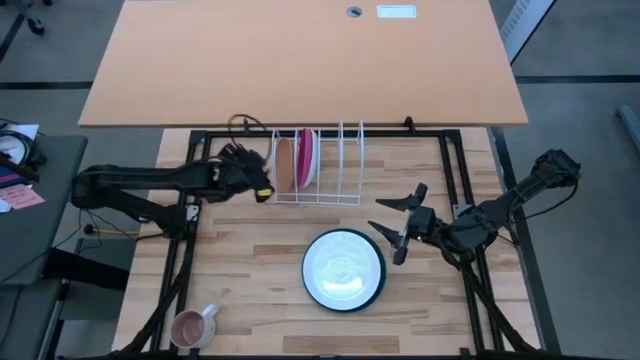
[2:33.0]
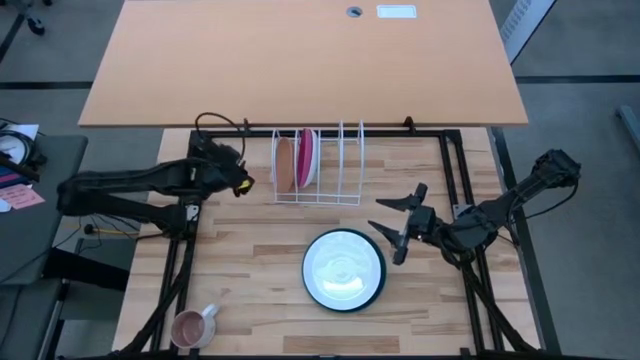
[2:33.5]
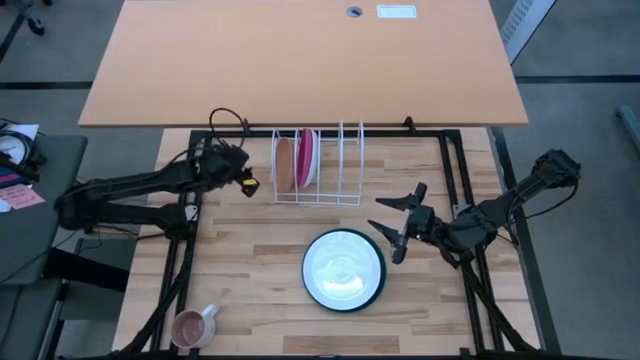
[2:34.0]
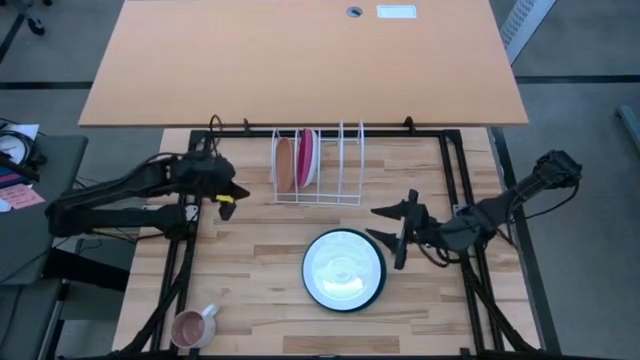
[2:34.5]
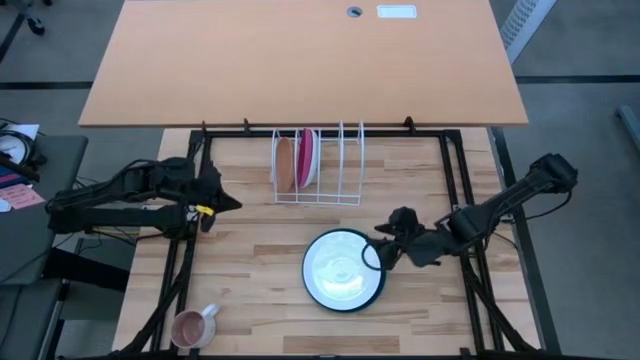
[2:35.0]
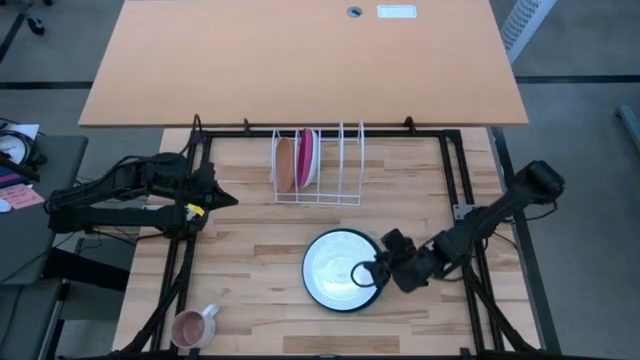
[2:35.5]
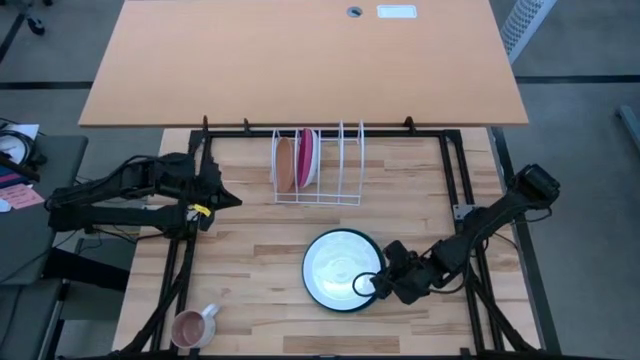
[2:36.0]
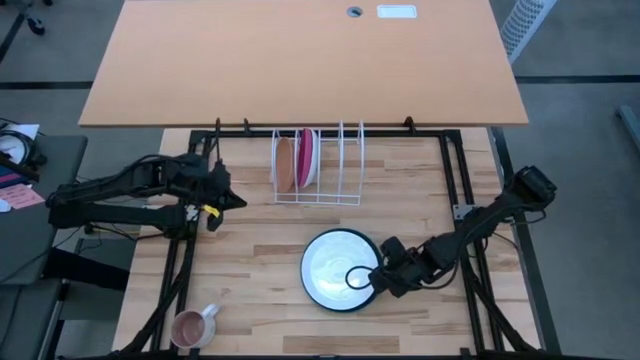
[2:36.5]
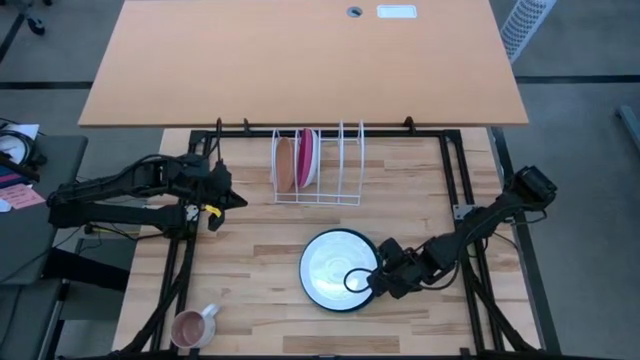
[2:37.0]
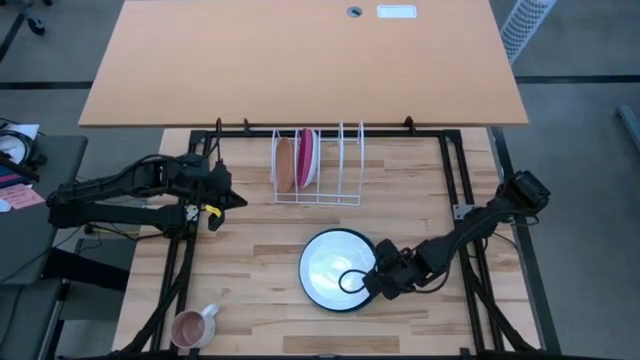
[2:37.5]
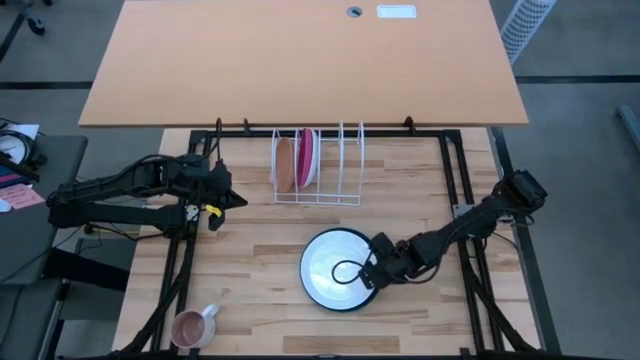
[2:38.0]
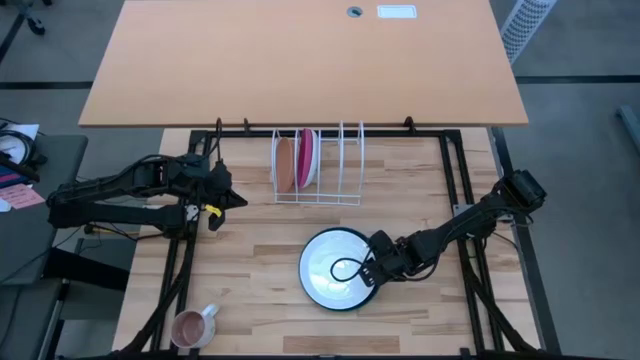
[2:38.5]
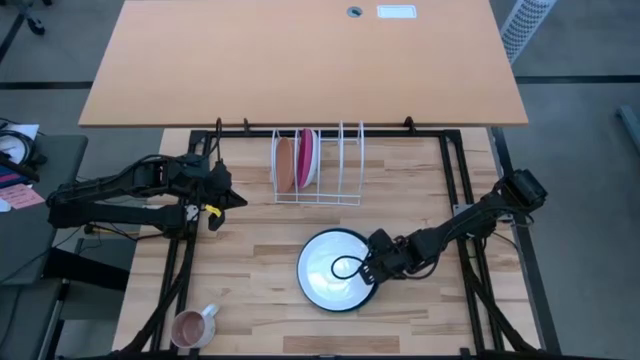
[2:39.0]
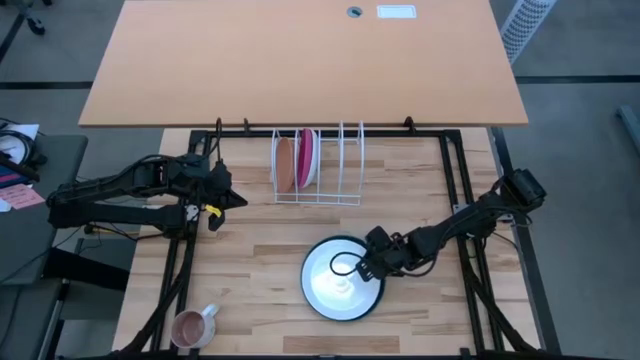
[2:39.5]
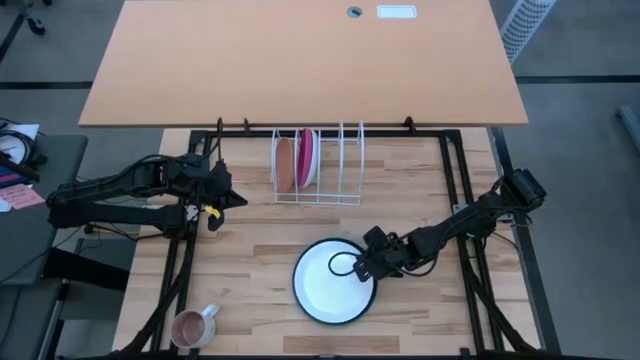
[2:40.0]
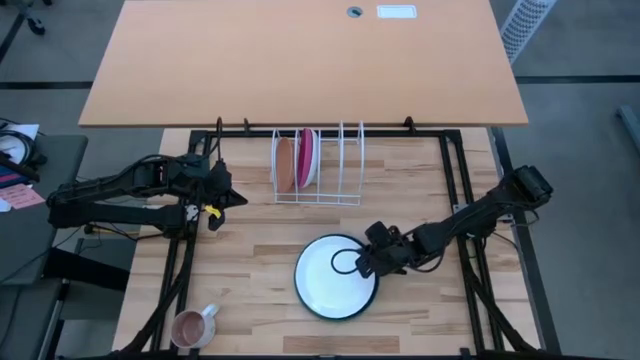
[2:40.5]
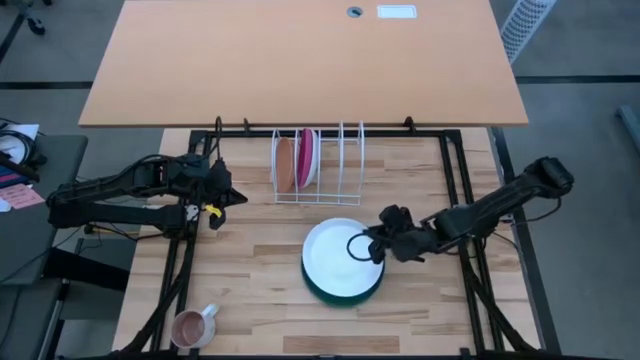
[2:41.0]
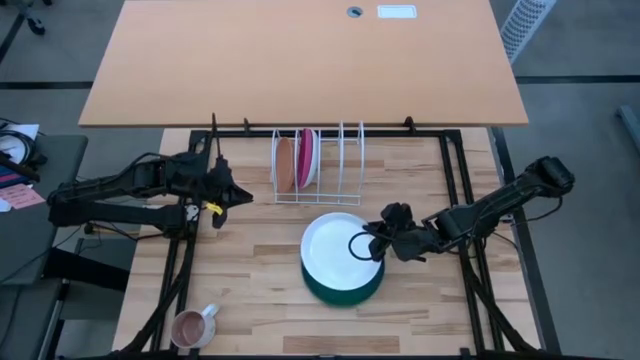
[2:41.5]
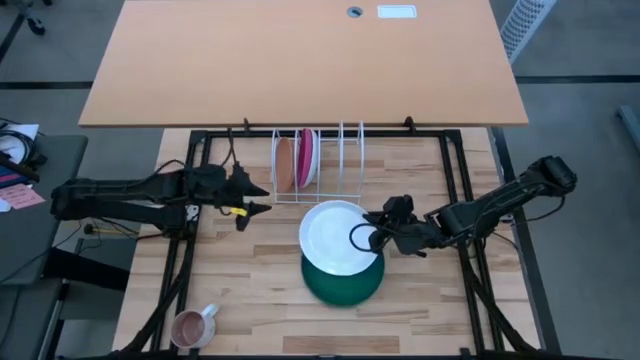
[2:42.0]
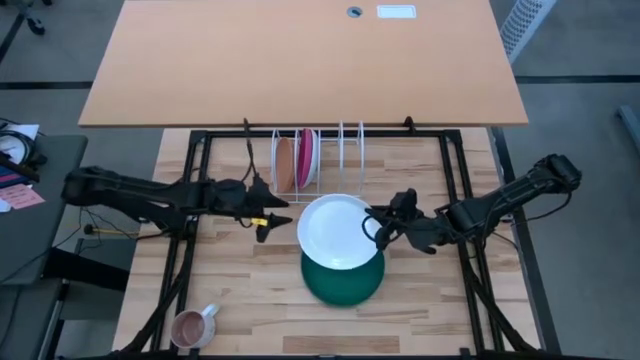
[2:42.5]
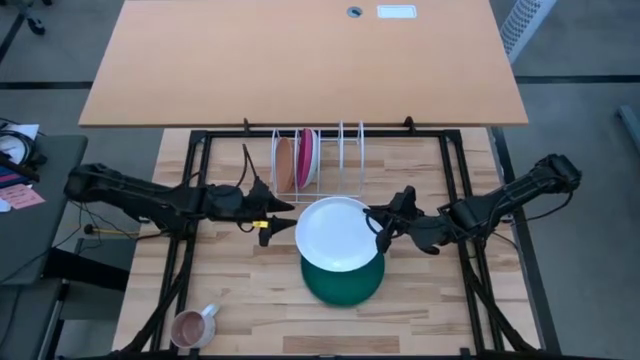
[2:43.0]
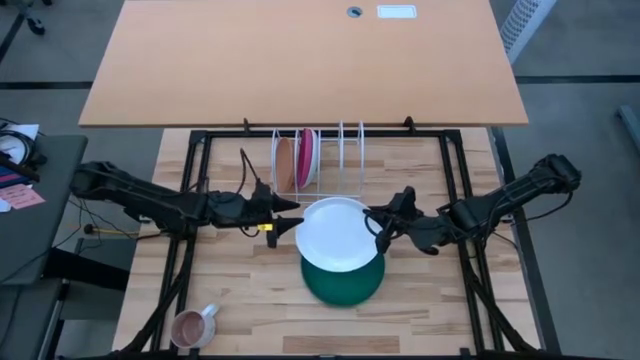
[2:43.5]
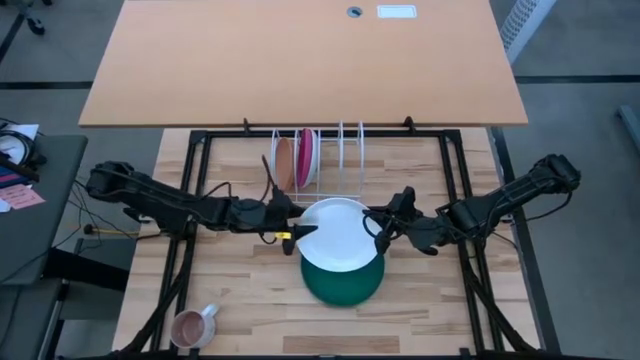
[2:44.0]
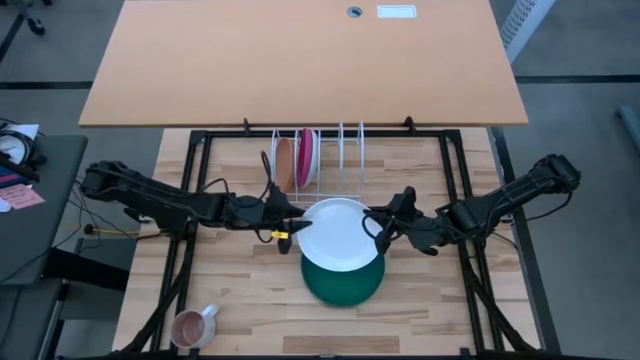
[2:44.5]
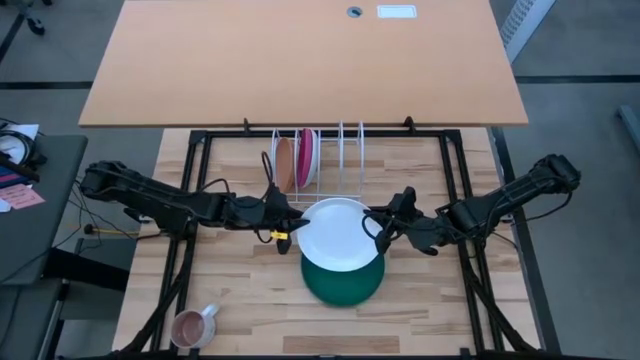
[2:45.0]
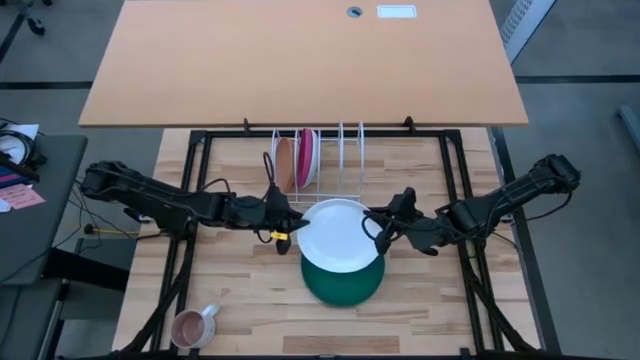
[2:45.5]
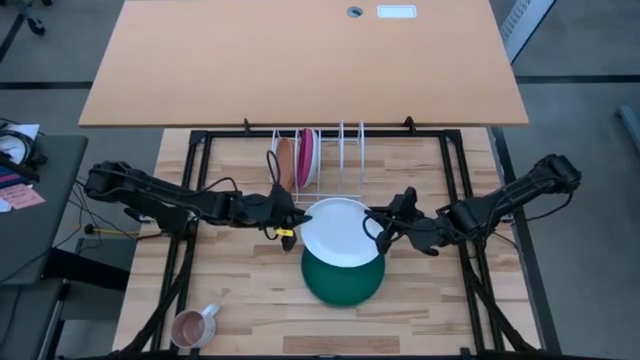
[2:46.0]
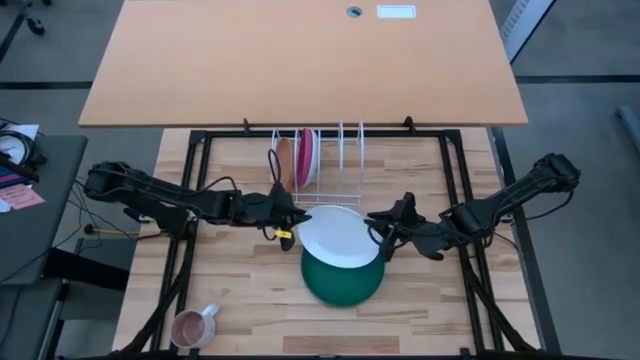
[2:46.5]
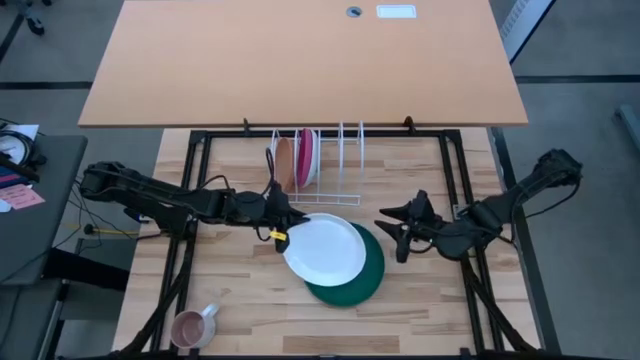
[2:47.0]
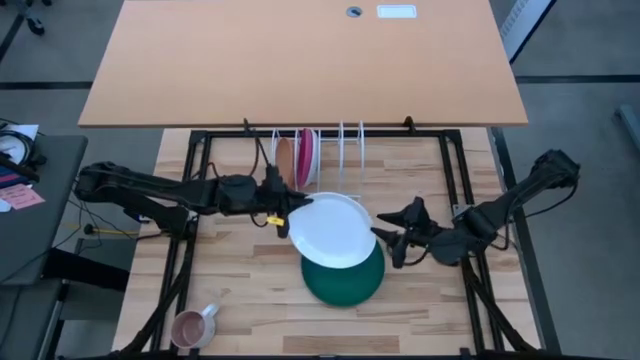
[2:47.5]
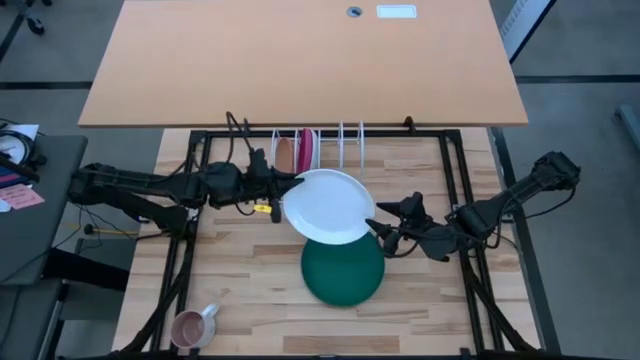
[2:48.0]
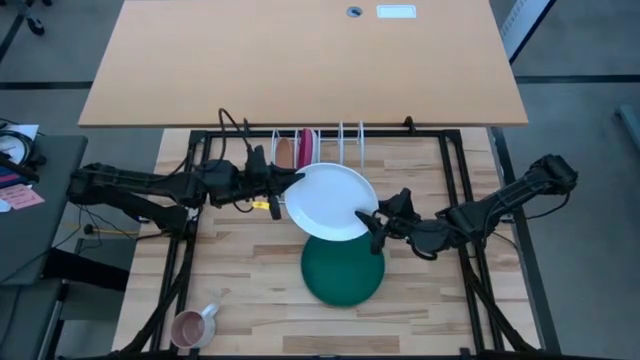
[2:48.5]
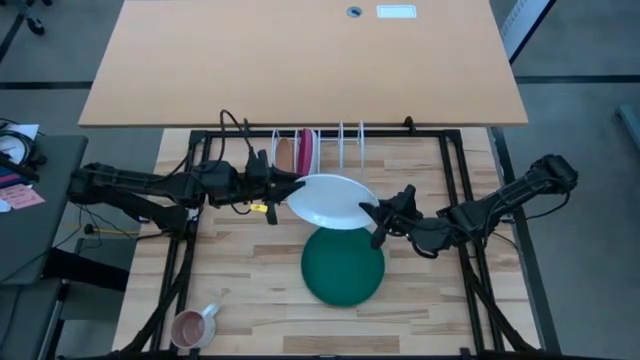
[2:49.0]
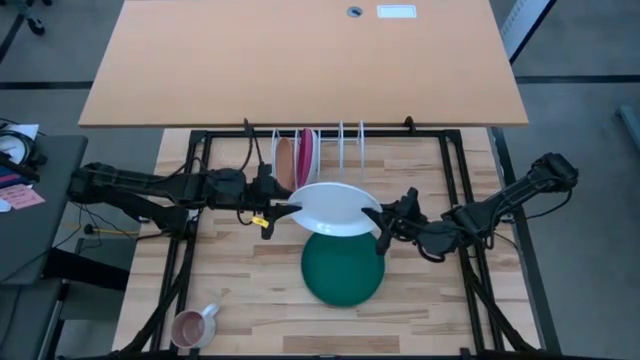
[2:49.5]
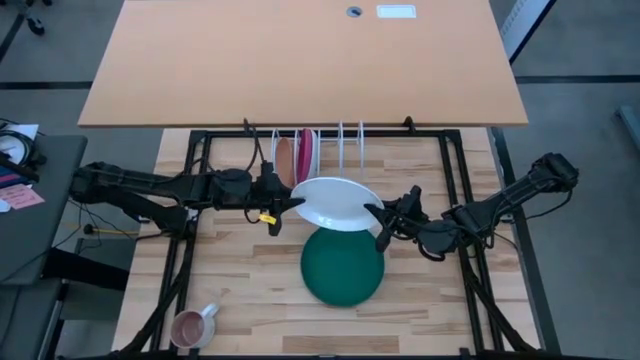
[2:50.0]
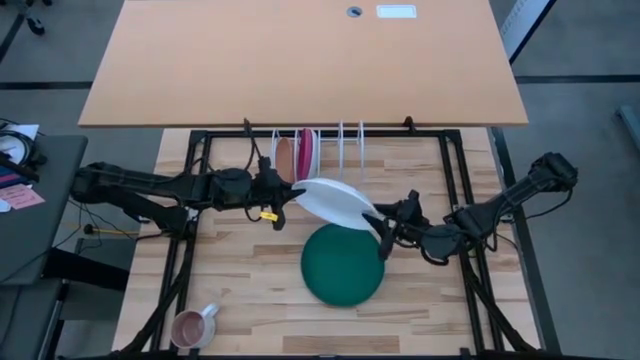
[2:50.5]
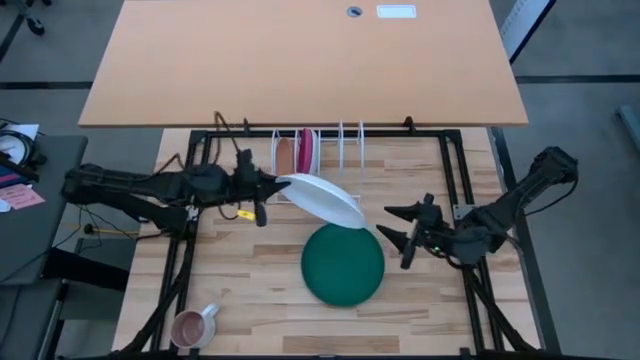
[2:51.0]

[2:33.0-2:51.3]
Task: Sort dishes
Put the white plate in the dish rack

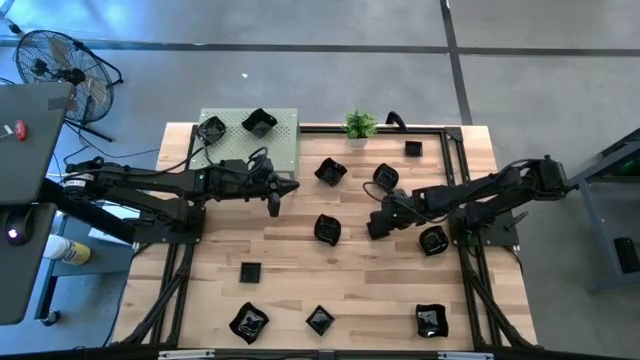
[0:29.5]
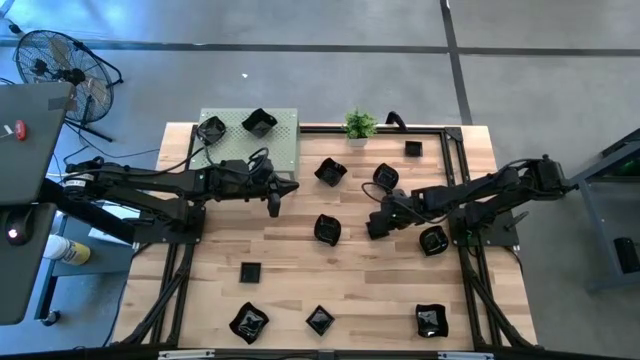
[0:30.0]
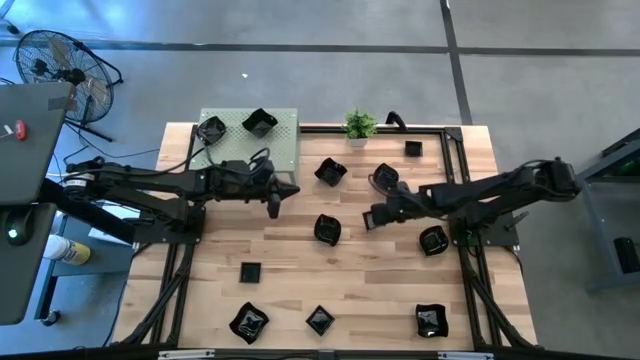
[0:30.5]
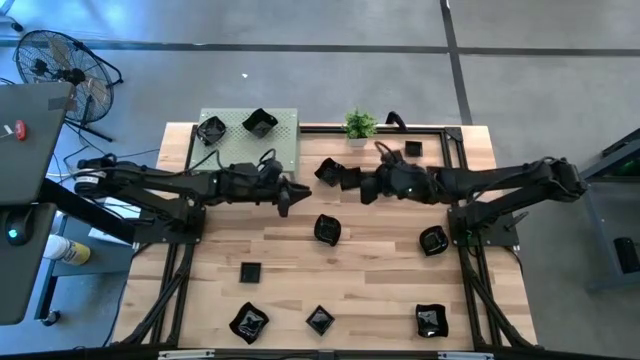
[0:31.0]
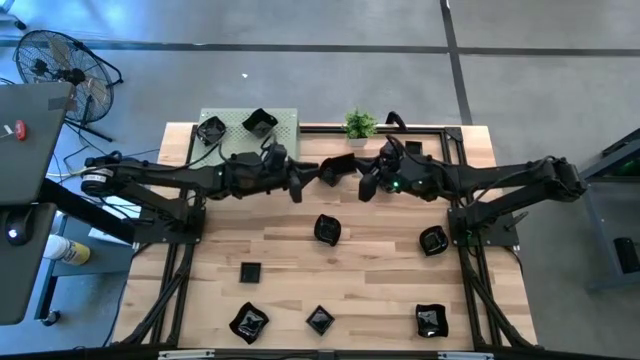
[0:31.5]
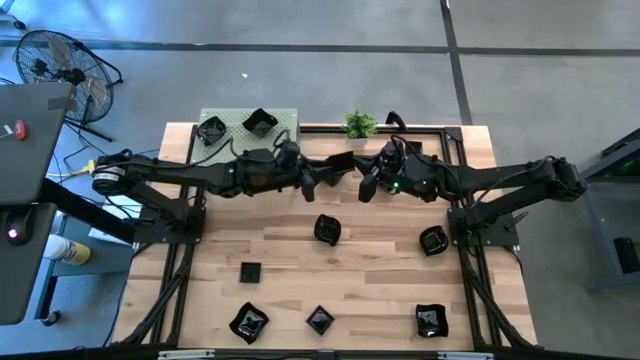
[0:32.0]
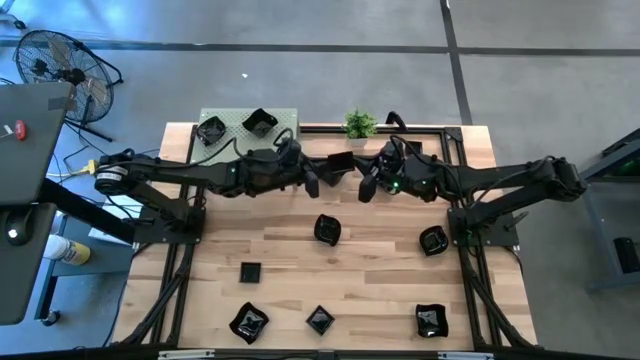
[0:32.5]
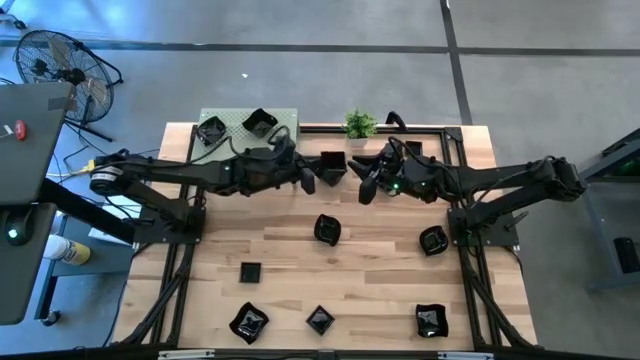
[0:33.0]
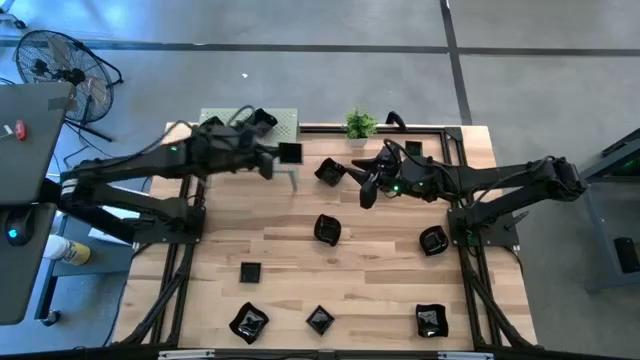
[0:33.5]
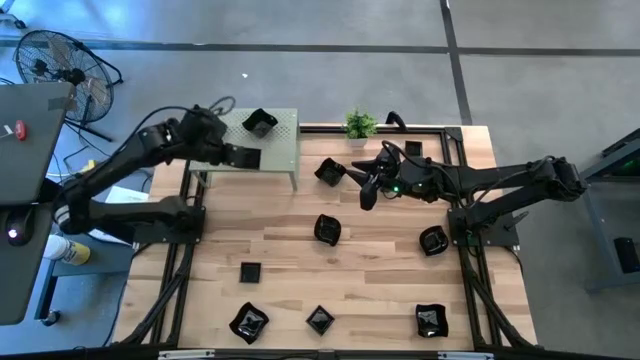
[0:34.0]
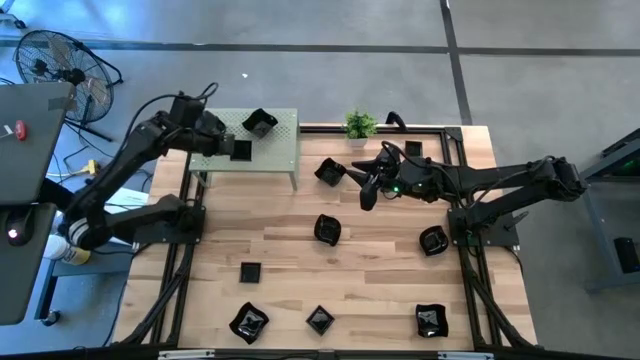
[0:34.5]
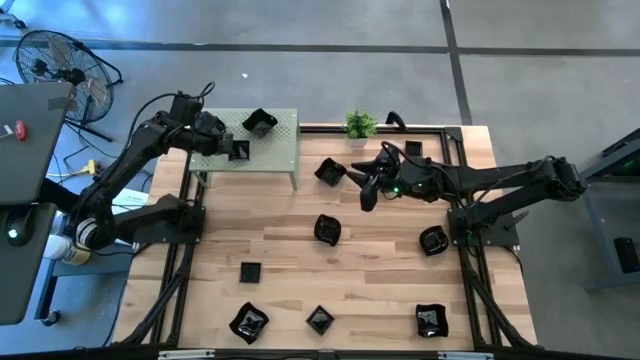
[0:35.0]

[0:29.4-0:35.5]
Task: Pick & Place Mini shaped plates
Put the black square plate on the shelf
